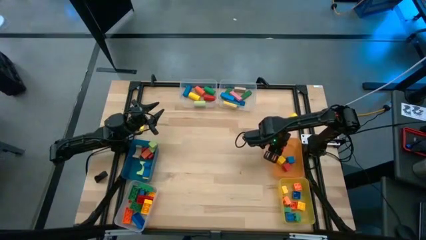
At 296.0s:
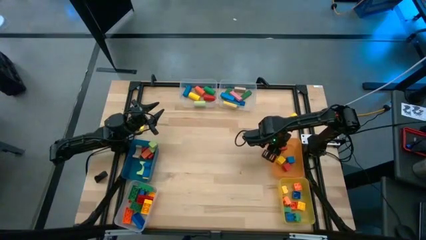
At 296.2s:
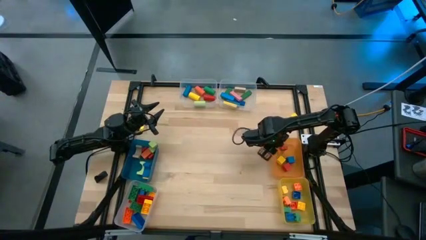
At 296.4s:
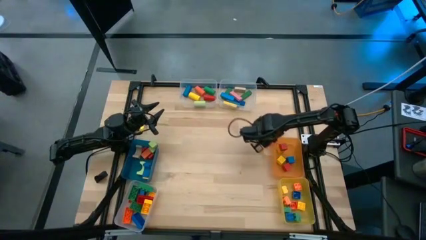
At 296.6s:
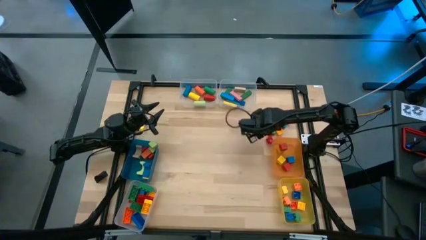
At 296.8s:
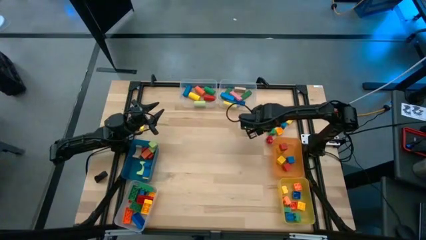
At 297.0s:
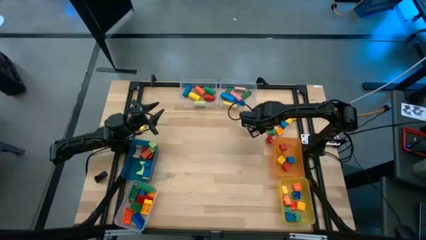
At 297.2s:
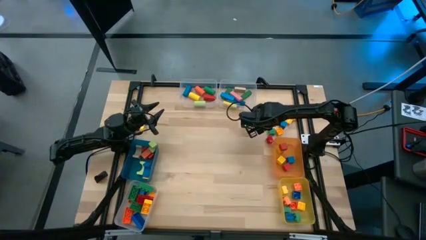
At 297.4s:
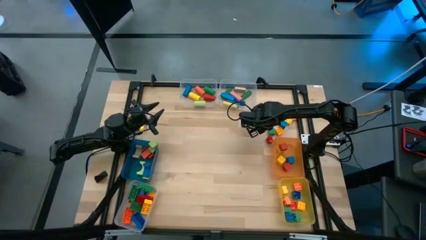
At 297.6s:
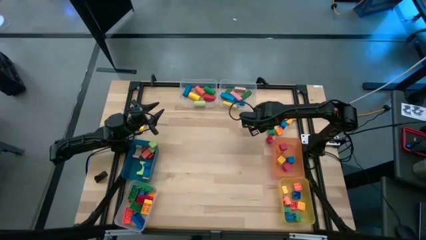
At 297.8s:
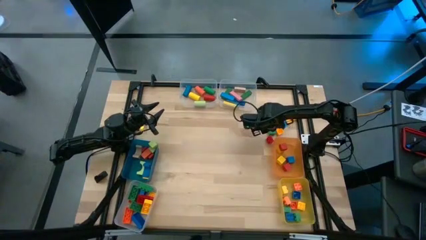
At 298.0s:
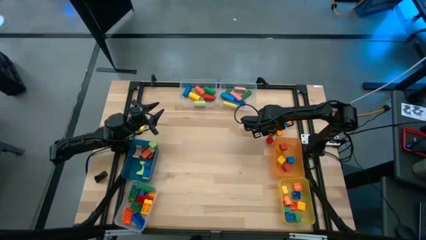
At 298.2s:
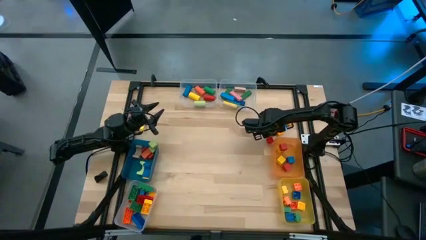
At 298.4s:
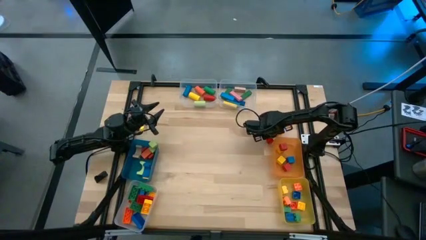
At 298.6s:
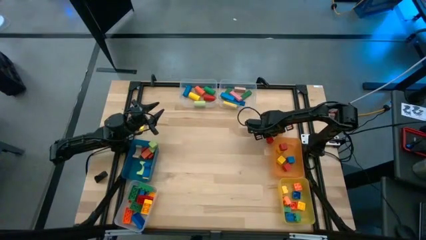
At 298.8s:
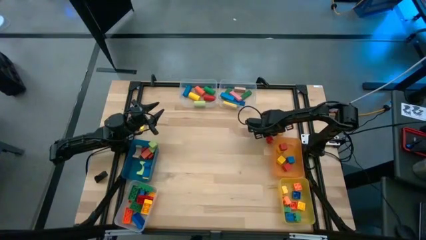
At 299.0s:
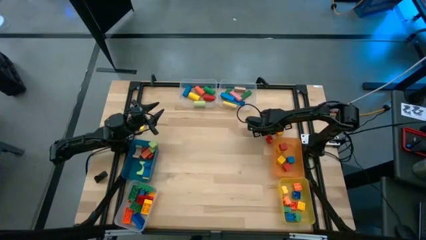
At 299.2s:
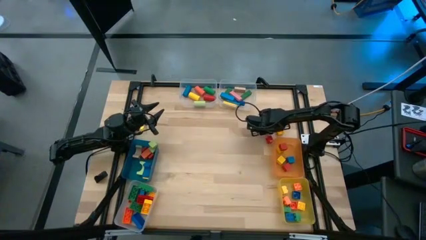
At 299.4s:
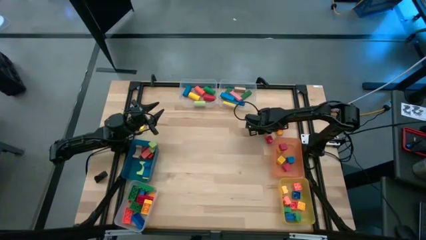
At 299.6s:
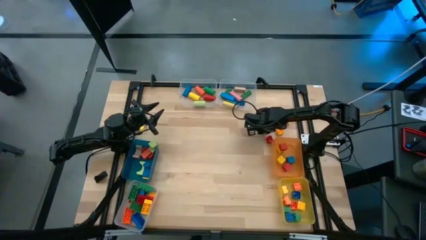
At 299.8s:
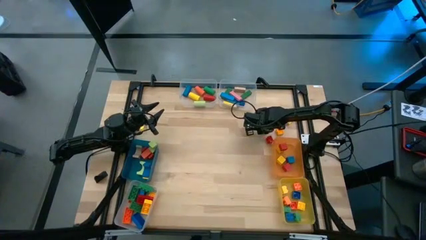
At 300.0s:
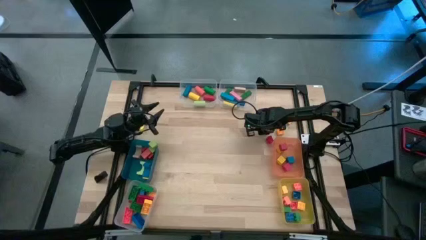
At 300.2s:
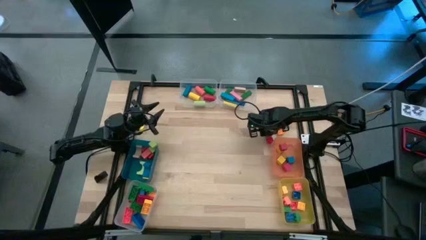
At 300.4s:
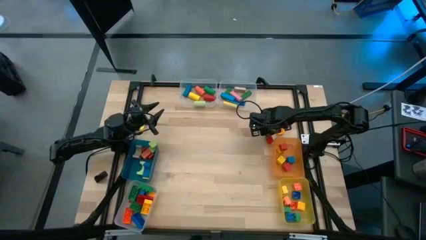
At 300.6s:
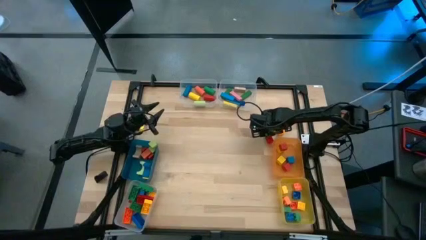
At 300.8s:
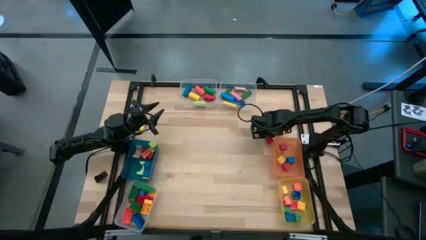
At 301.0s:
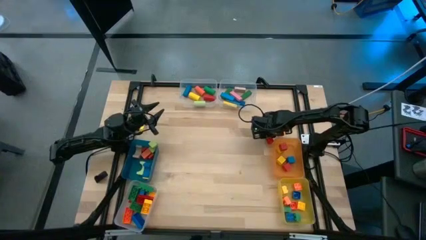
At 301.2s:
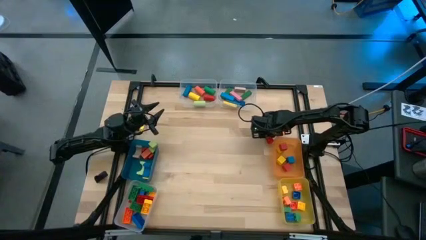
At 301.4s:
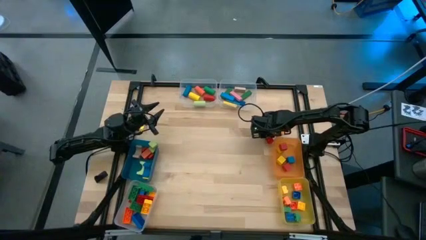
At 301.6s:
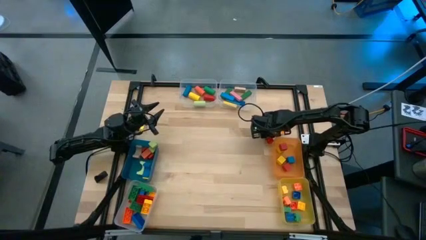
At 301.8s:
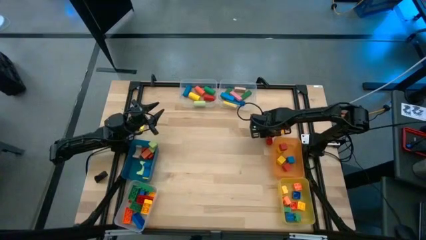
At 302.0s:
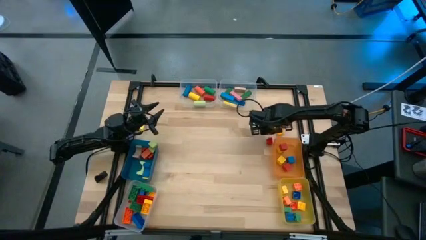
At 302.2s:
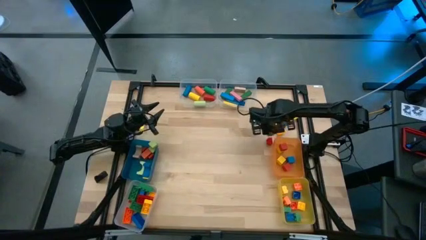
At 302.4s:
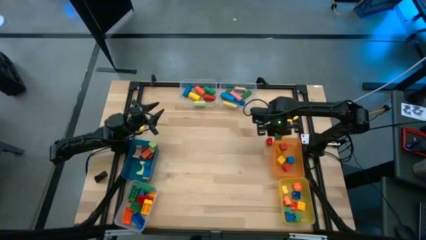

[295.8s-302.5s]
Task: Sort blocks by size
Put the green block into the orange bin

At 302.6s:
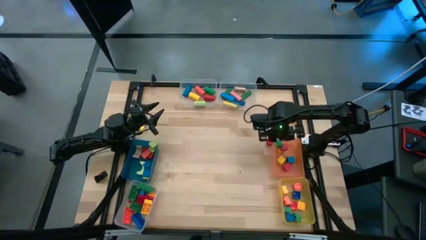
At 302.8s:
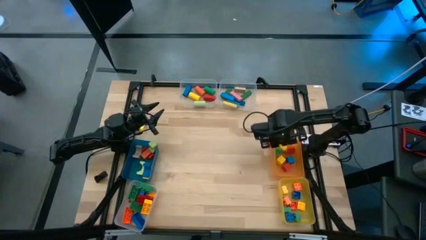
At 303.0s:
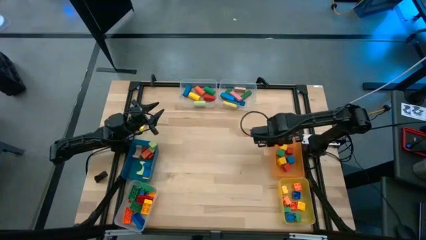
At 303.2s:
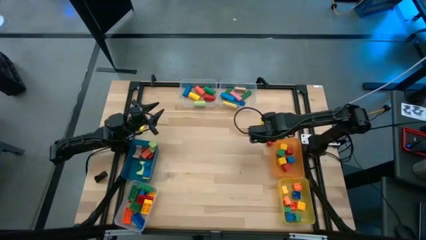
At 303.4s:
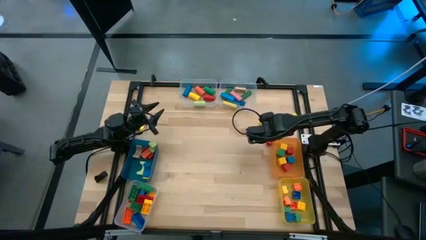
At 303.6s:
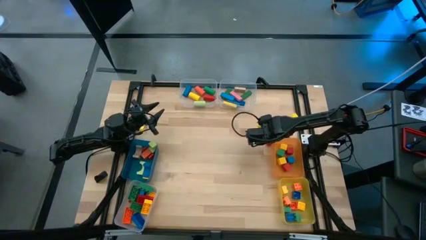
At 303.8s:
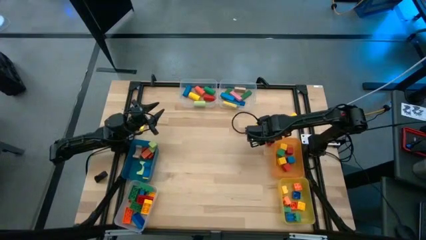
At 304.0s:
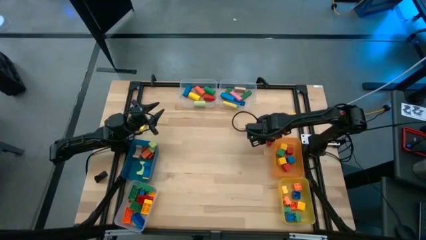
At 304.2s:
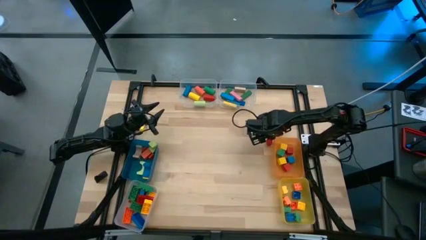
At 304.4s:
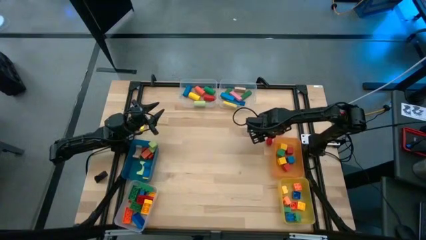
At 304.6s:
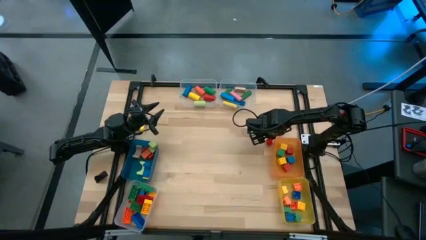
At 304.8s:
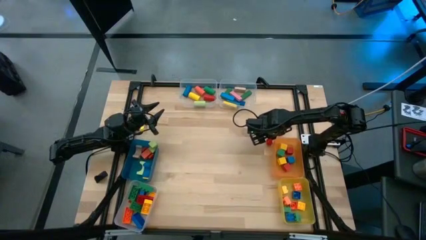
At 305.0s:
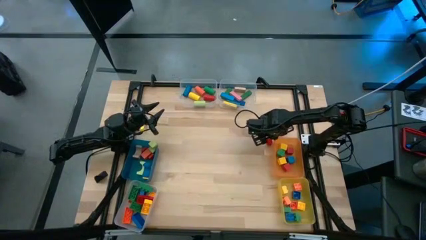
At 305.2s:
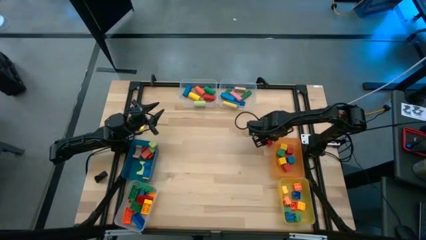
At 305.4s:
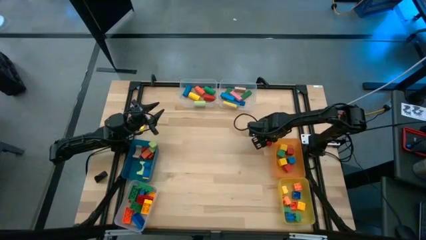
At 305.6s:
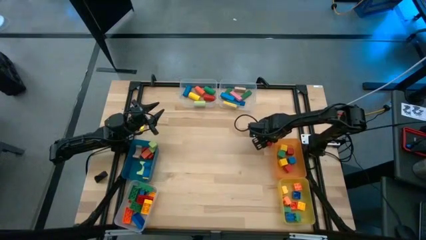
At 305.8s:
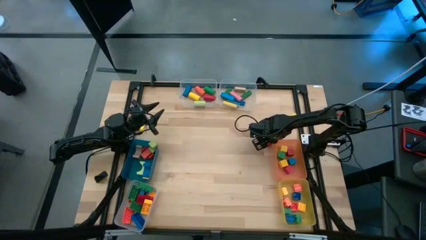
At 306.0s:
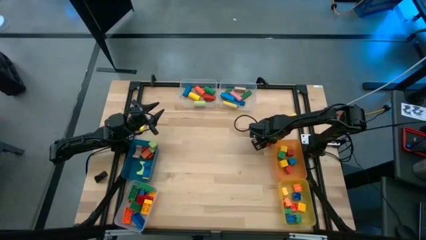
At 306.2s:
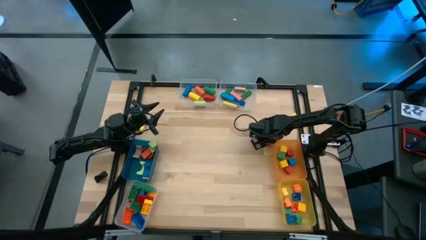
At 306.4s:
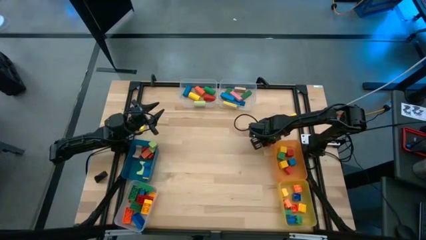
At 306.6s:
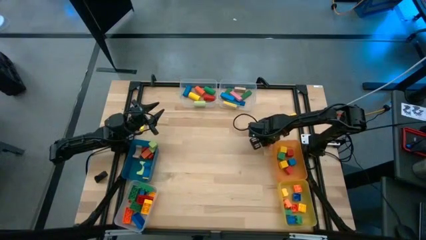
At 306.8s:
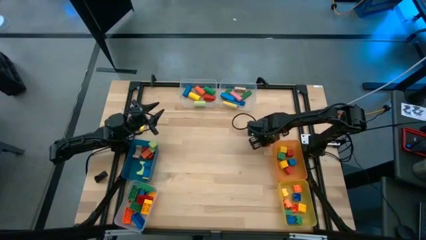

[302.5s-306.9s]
Put the red game piece into the yellow bin

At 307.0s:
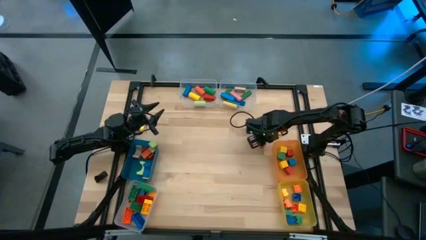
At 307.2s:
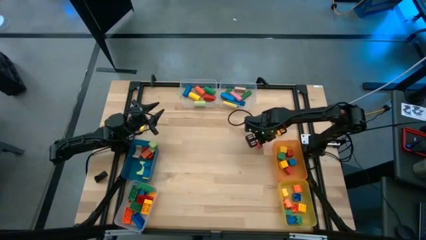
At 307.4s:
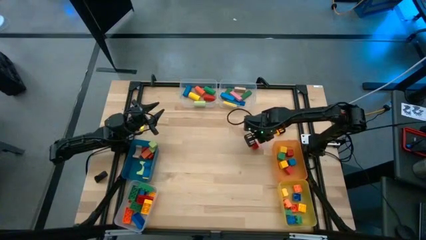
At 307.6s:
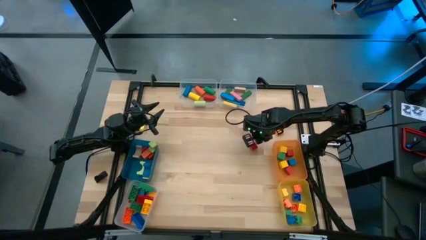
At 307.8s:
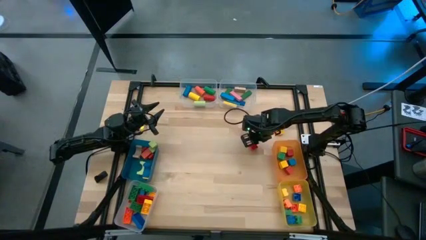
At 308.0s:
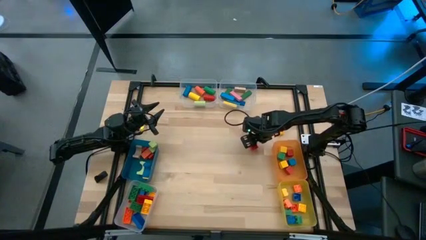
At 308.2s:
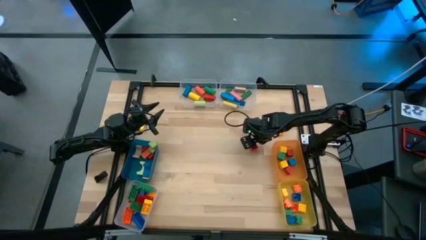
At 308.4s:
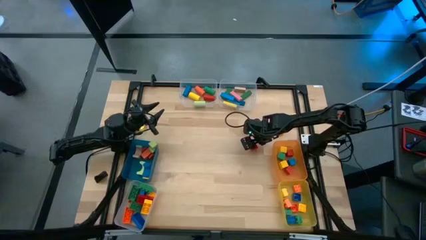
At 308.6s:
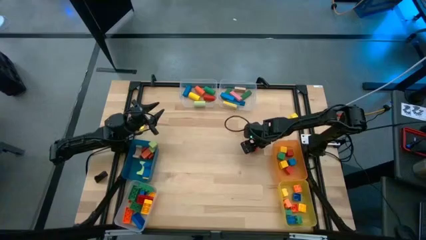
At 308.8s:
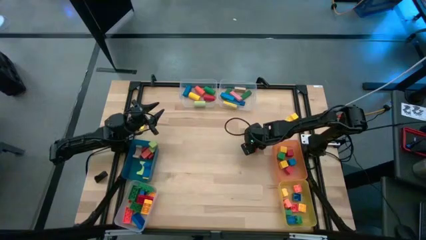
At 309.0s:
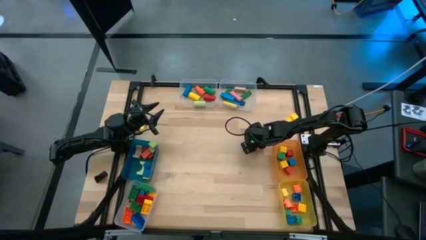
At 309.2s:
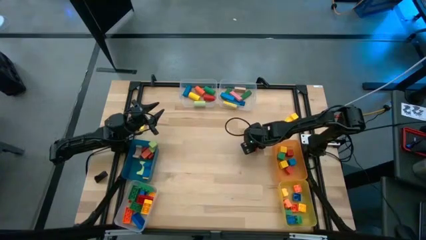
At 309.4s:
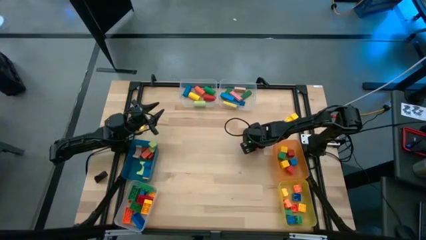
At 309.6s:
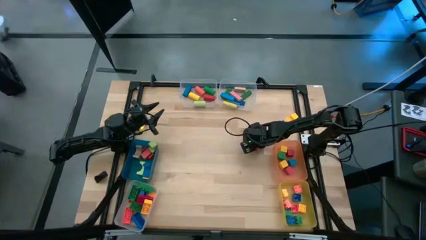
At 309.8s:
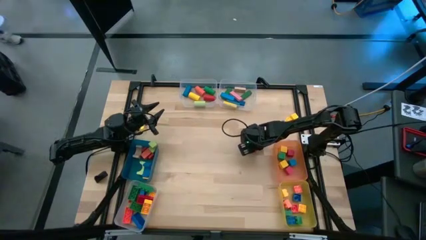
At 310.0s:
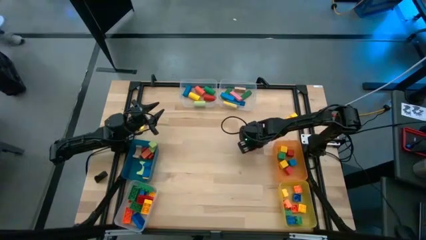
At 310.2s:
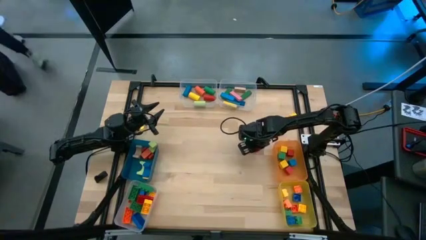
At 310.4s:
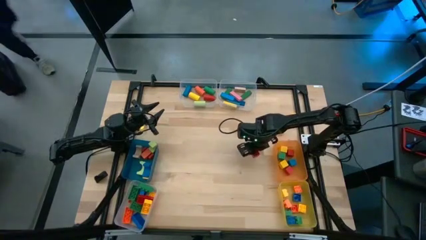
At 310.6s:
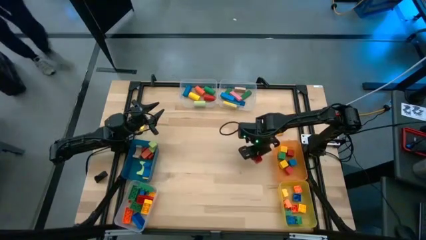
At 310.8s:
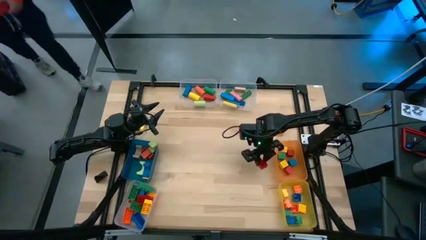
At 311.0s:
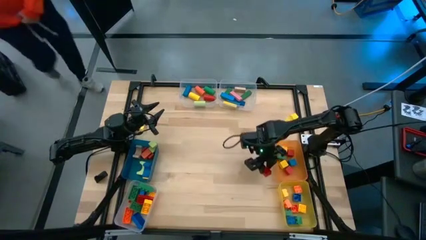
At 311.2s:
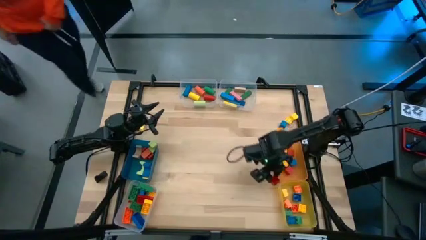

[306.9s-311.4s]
Put the orange game piece into the yellow bin

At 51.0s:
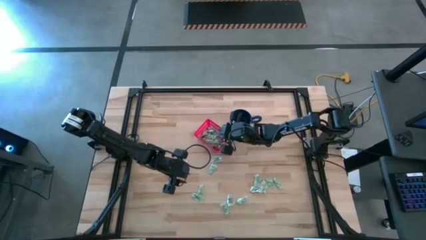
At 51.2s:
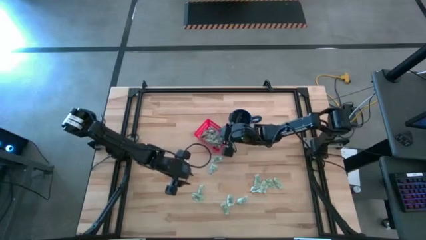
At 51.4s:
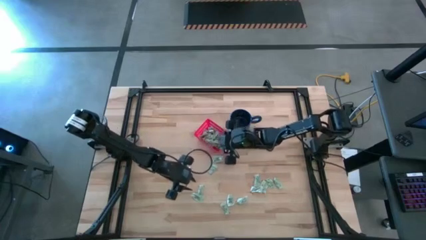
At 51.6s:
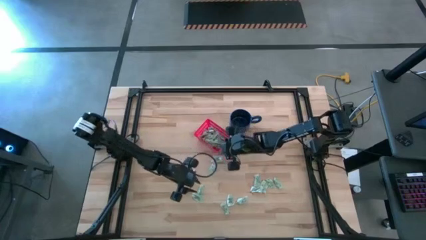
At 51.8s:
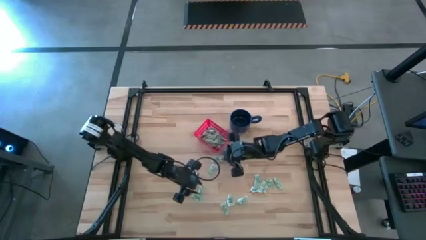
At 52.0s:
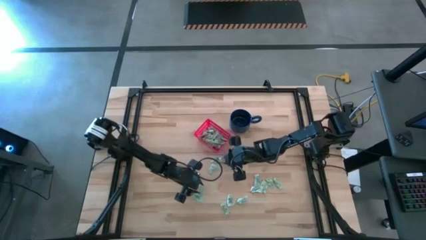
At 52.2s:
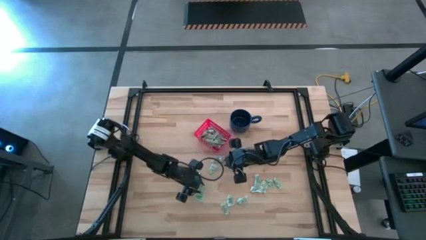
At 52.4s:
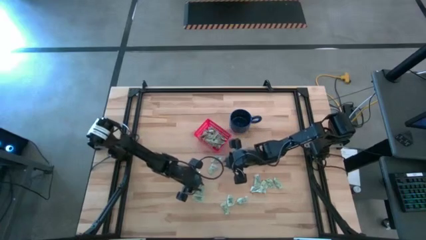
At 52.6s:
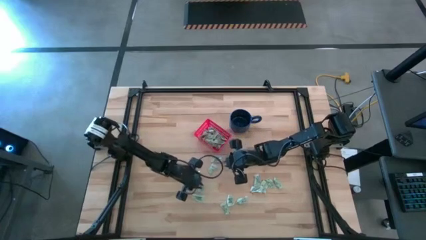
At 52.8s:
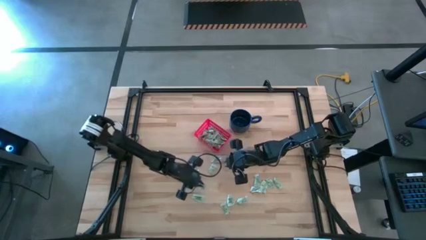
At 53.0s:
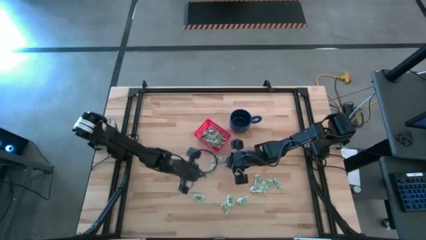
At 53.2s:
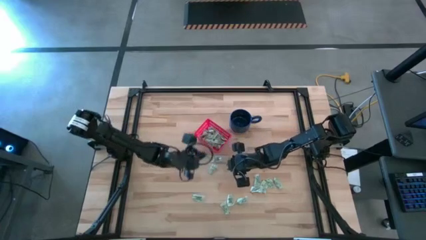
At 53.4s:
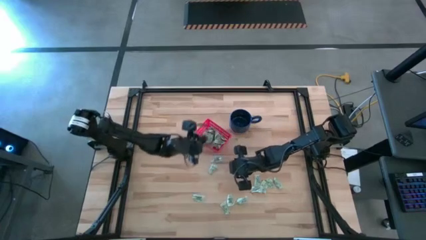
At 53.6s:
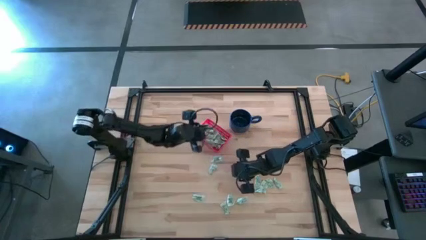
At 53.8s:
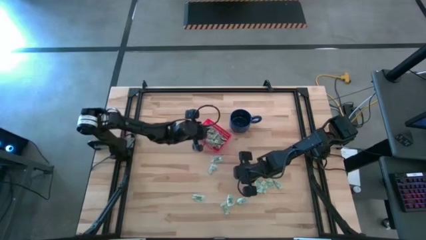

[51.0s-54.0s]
Task: Pick and place items into bin
Put the stevia packet into the bin
